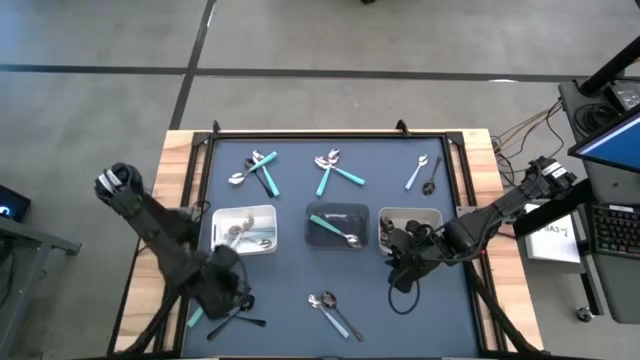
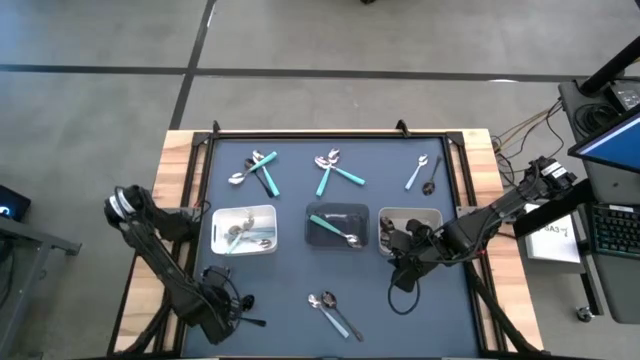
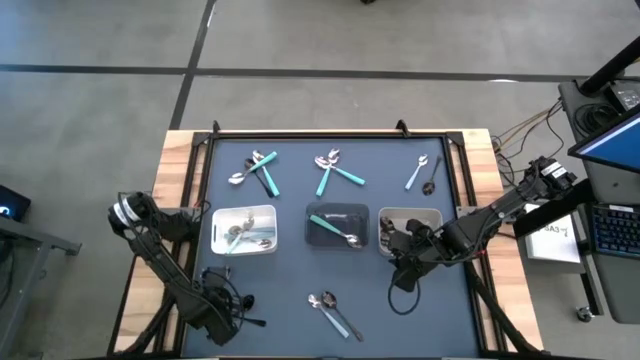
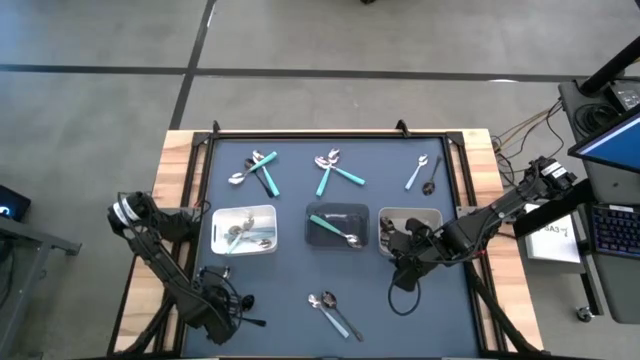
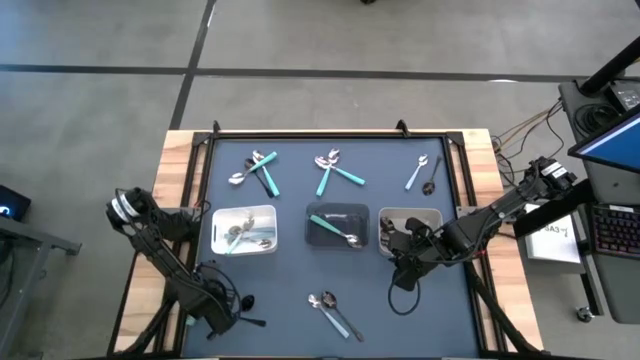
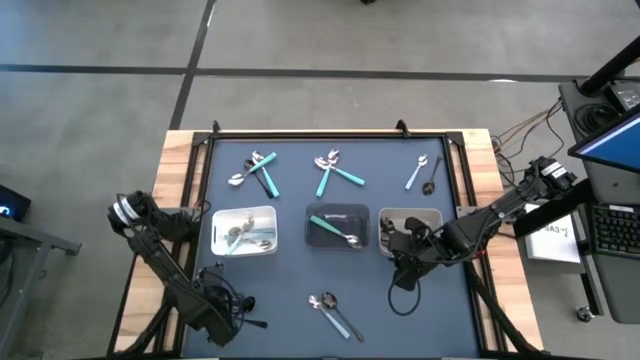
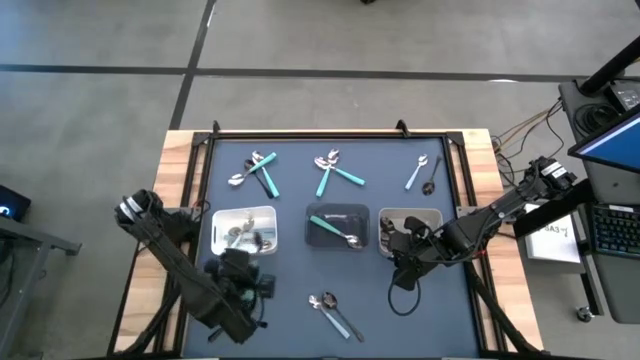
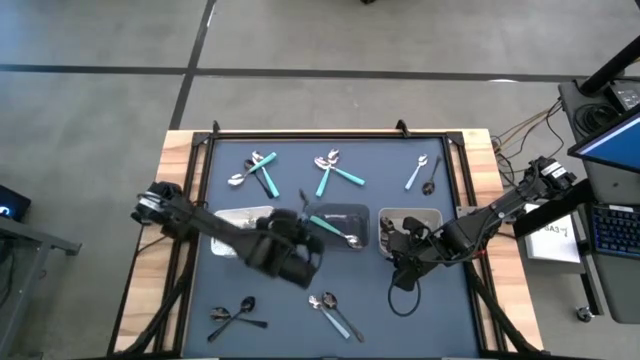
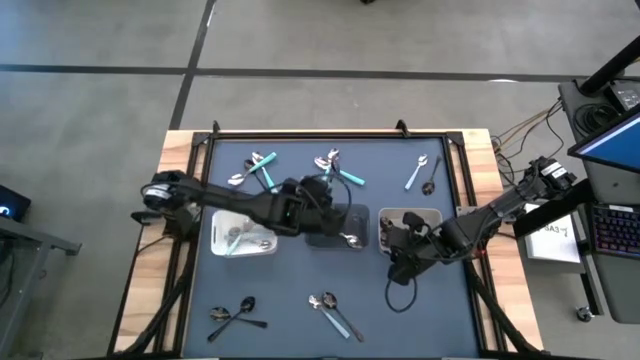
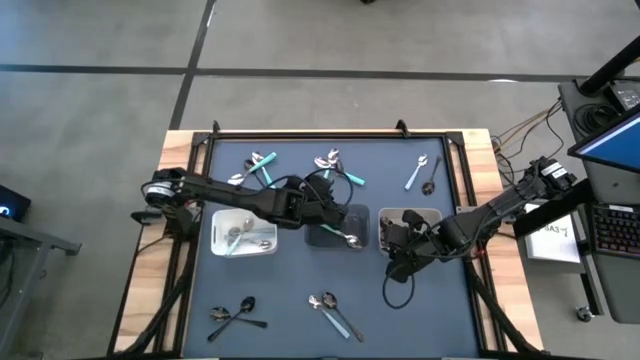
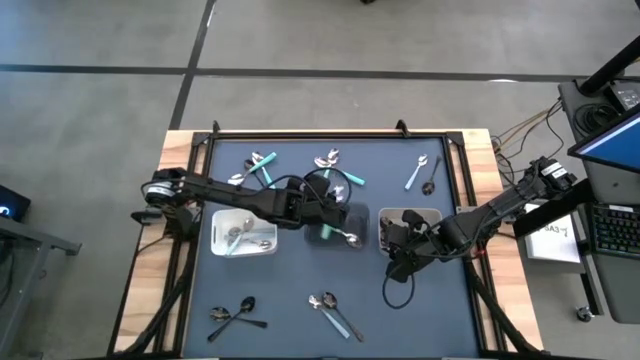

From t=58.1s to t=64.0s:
Task: Sort silverware by color (type)
Put the green spoon into the black transparent bin

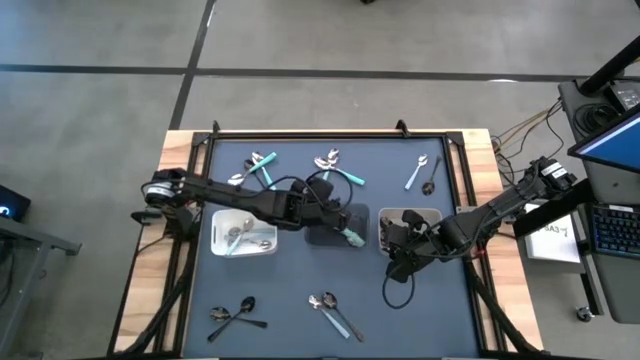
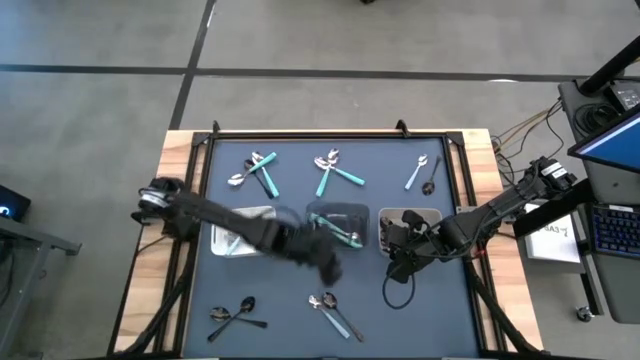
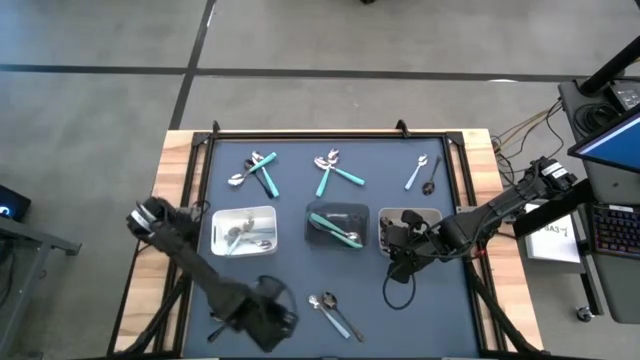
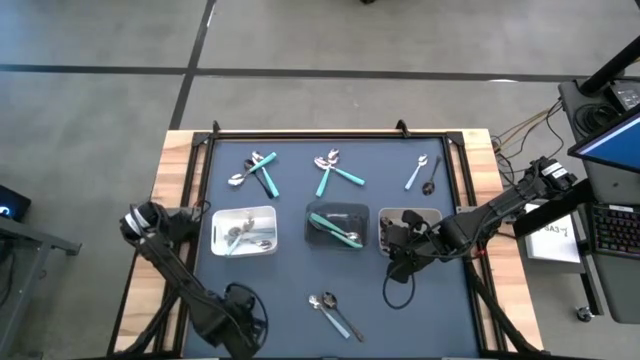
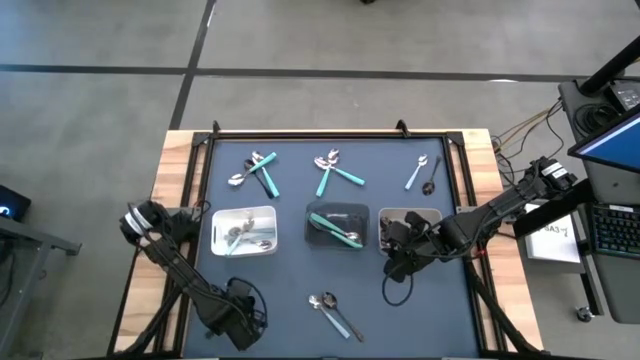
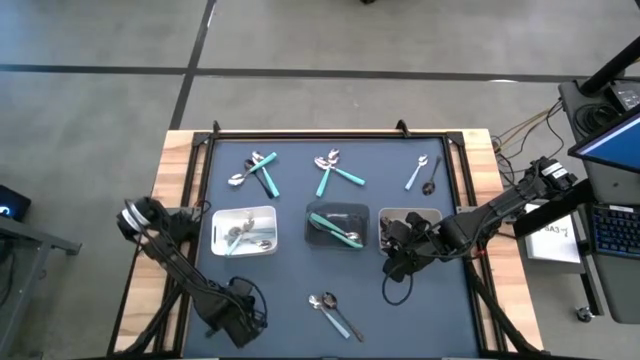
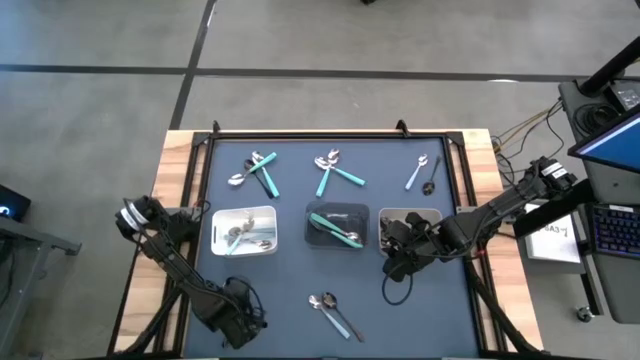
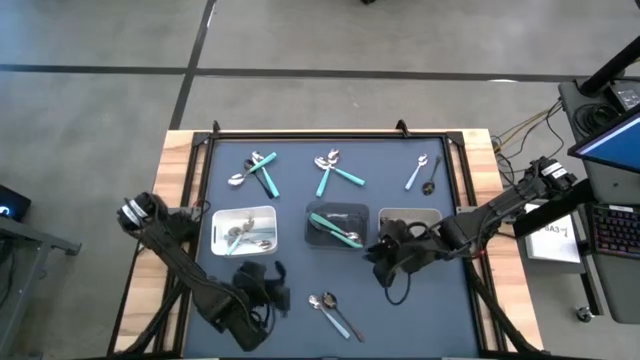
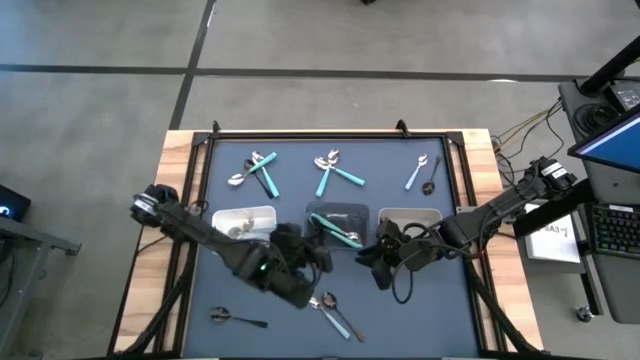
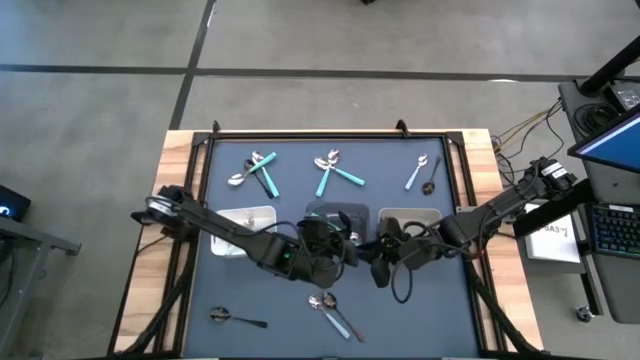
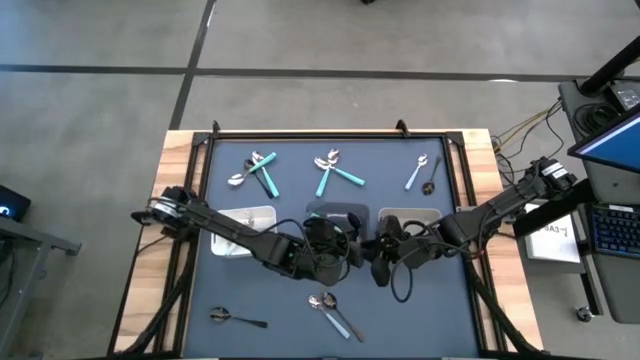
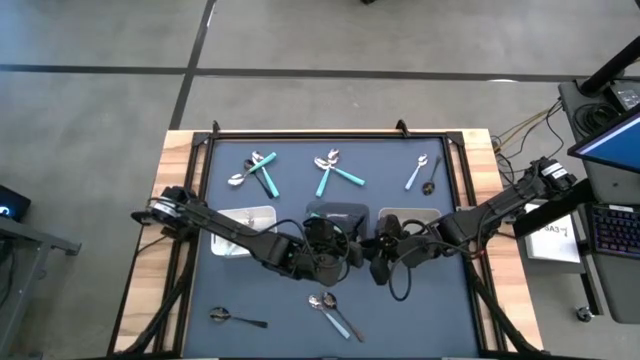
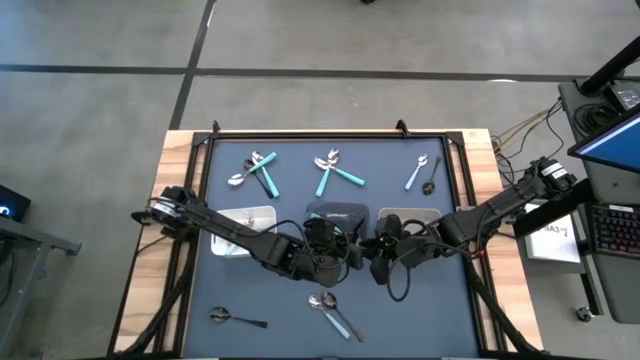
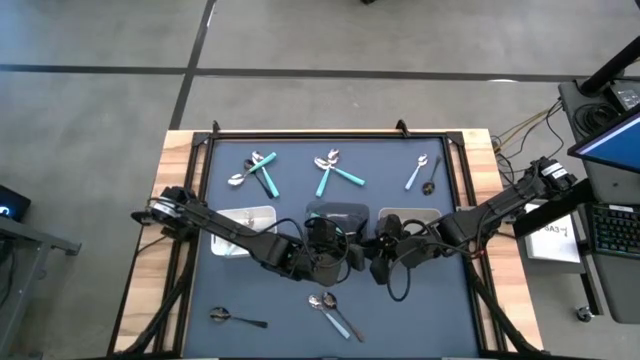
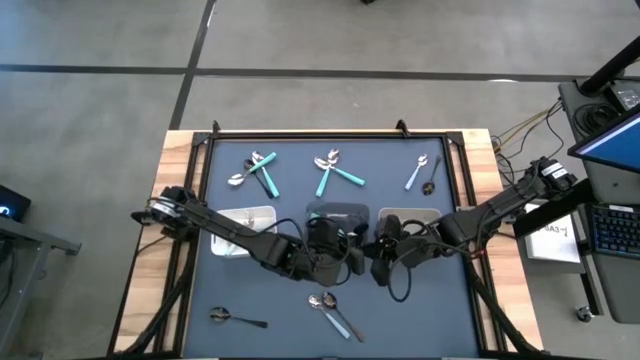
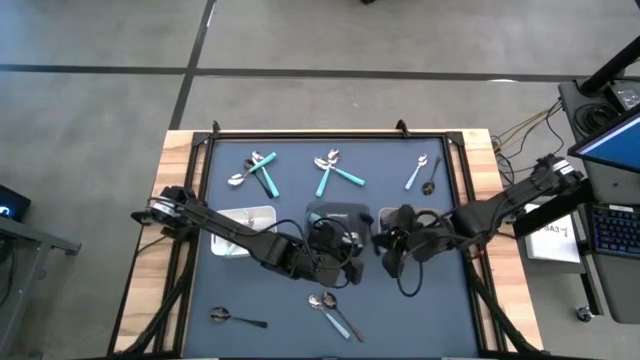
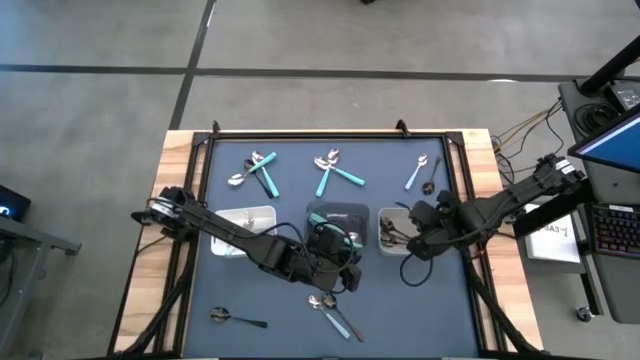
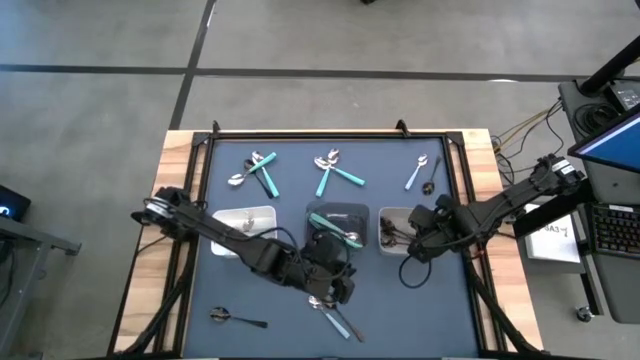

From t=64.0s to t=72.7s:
Put the black spoon into the gray bin

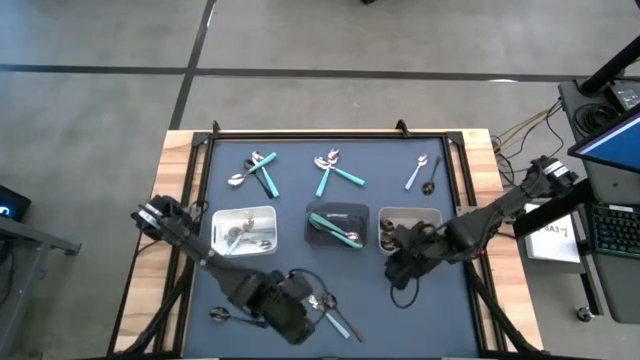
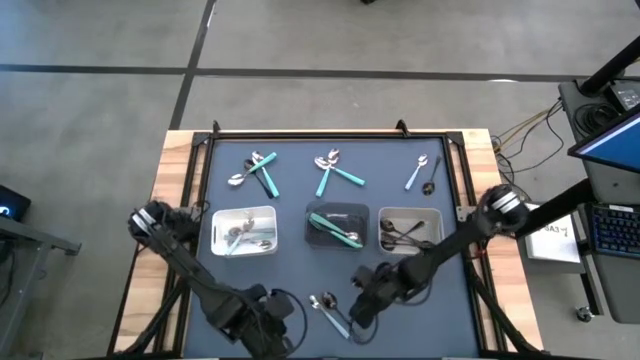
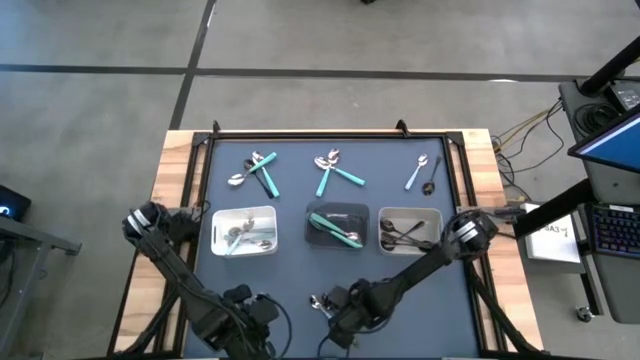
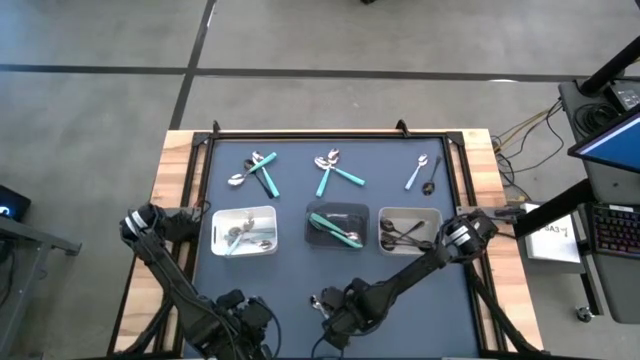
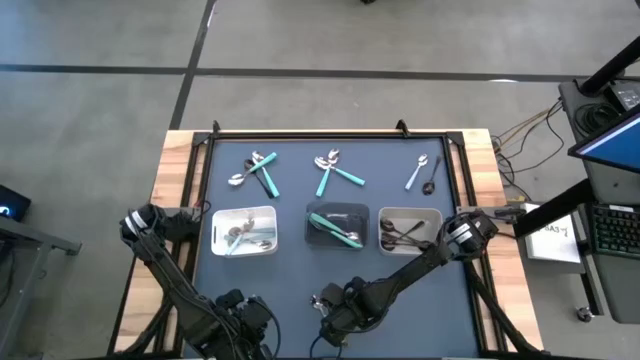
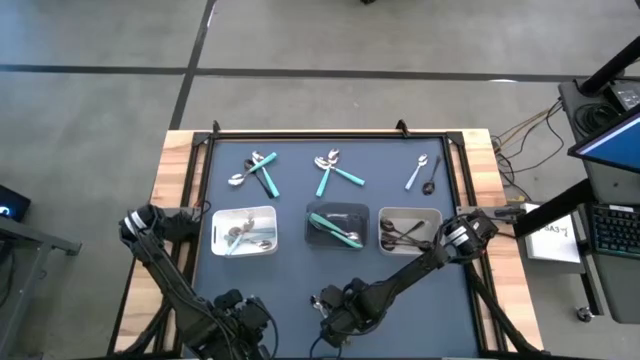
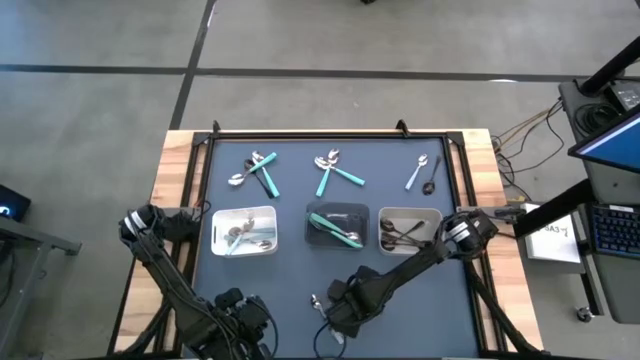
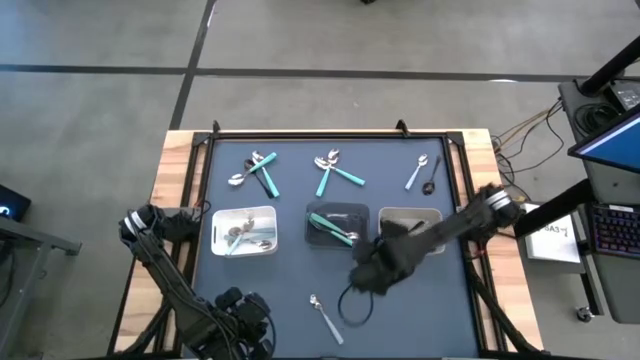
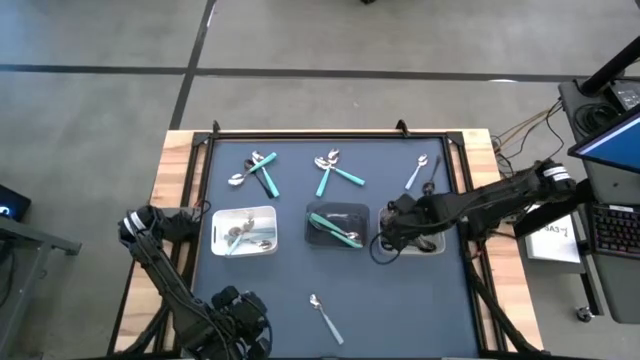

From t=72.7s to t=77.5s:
Put the black spoon into the gray bin

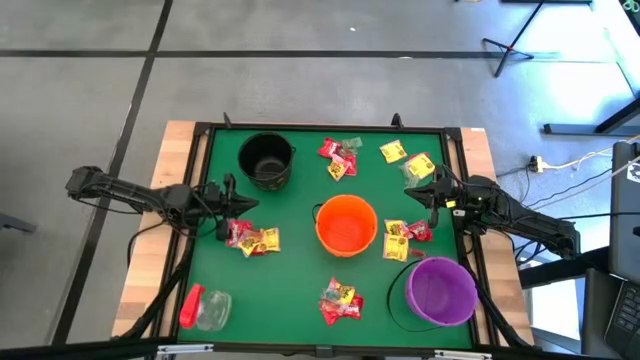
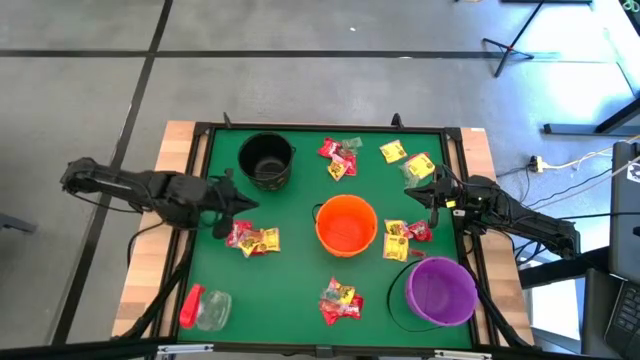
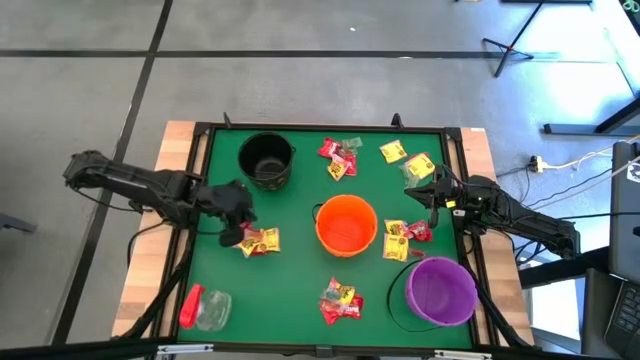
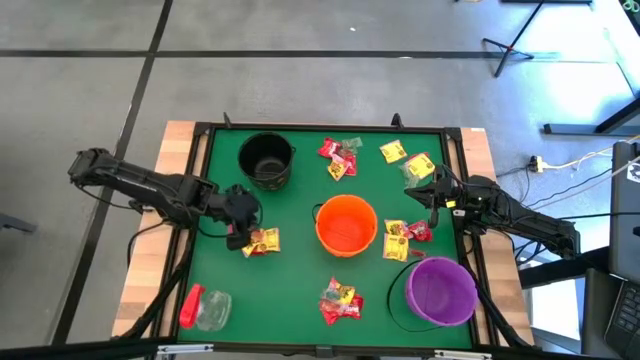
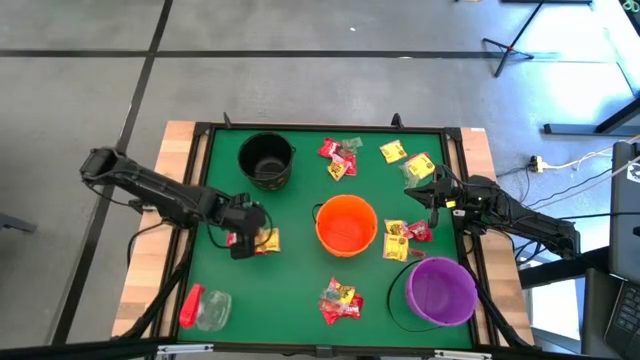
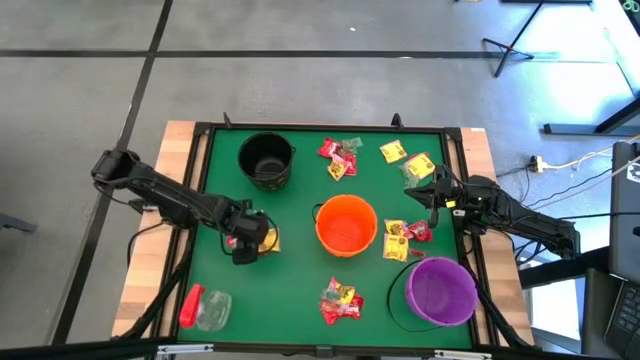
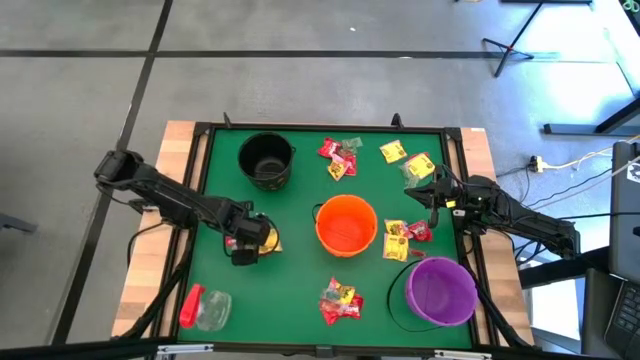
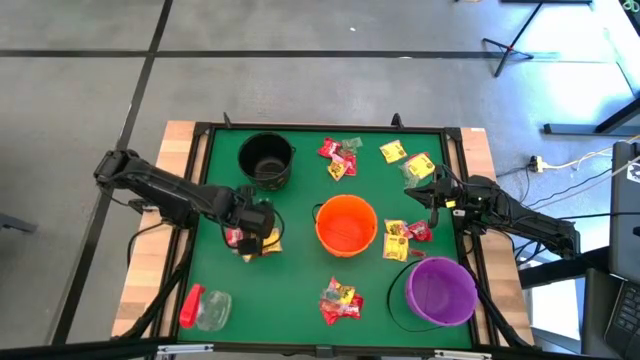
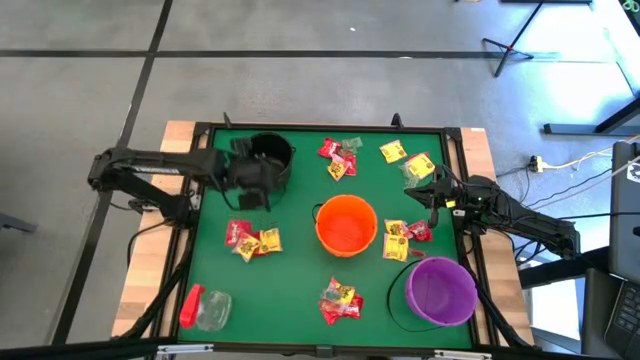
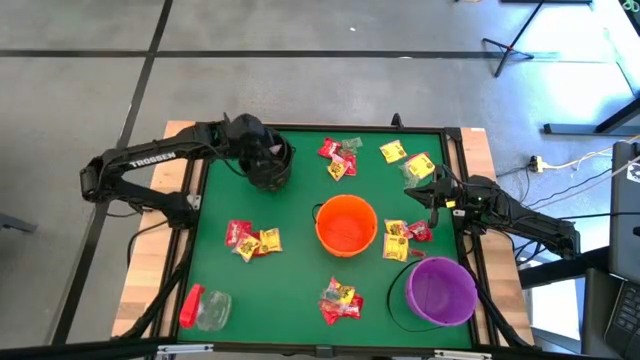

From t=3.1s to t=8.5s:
Task: Sort candy
Put the orange candy into the black bin
